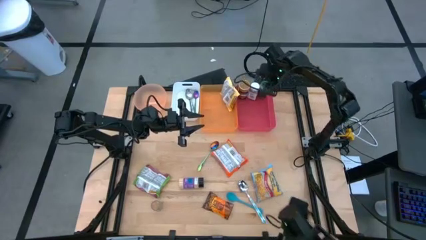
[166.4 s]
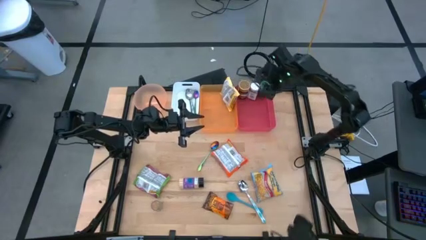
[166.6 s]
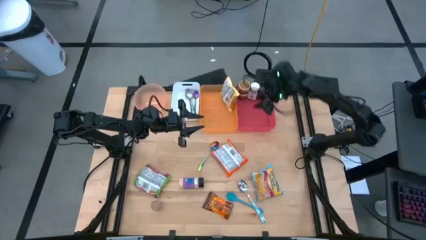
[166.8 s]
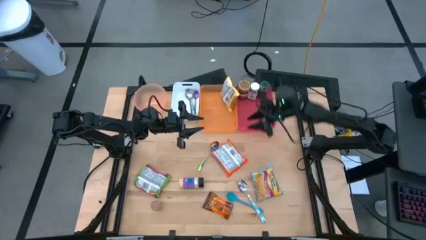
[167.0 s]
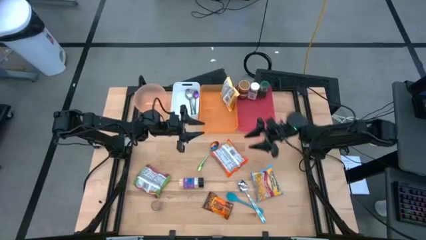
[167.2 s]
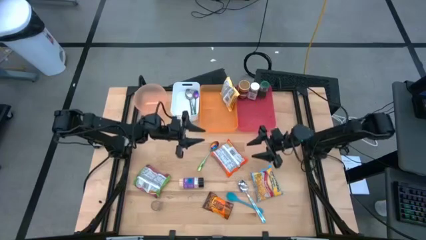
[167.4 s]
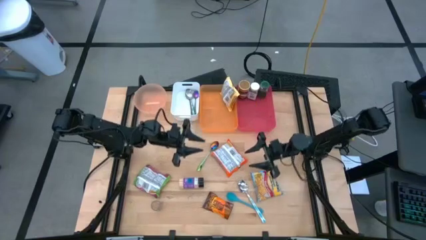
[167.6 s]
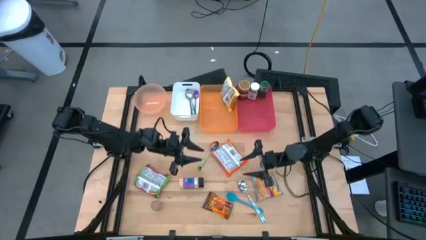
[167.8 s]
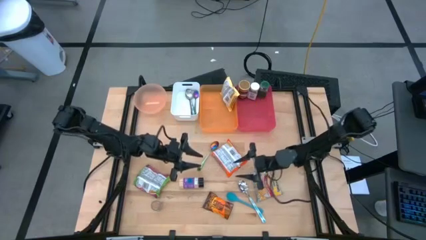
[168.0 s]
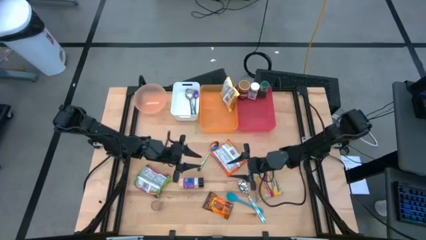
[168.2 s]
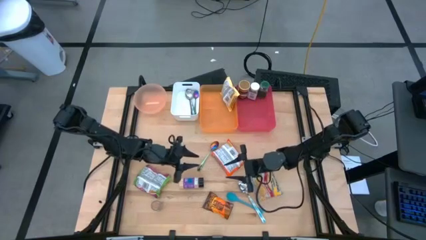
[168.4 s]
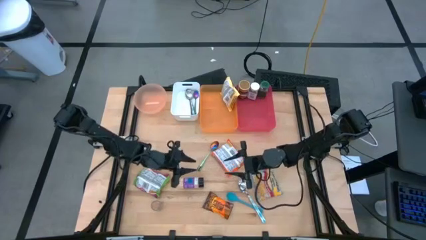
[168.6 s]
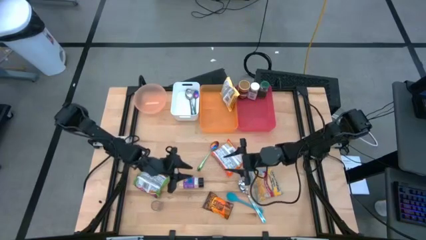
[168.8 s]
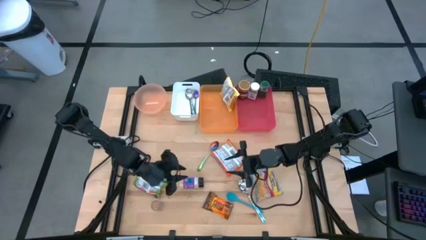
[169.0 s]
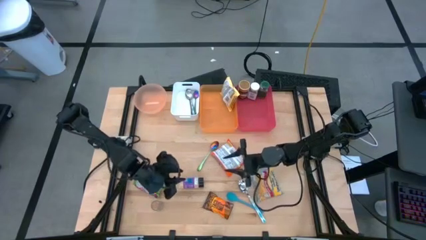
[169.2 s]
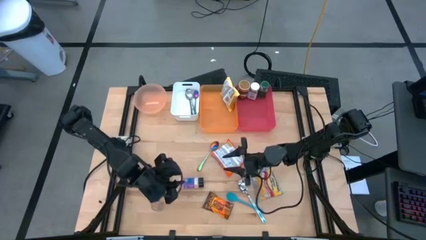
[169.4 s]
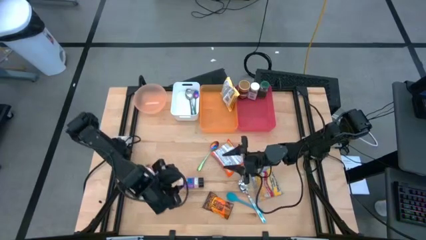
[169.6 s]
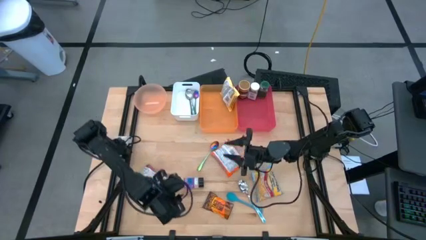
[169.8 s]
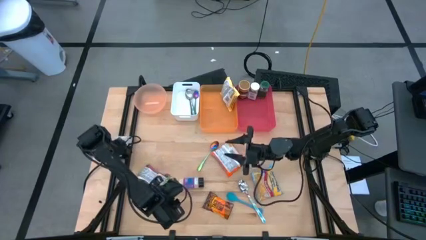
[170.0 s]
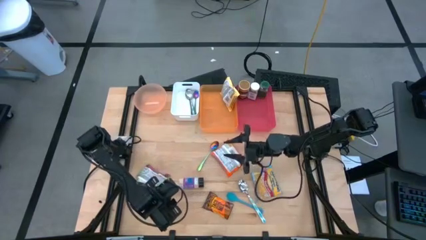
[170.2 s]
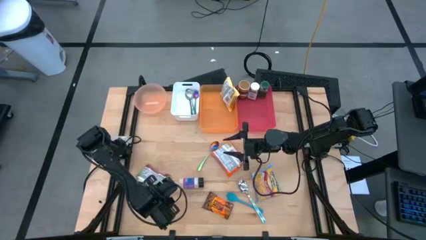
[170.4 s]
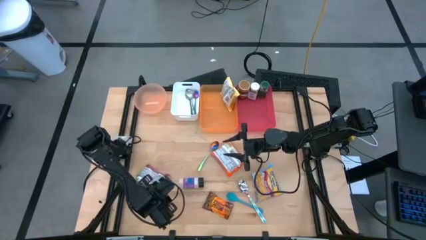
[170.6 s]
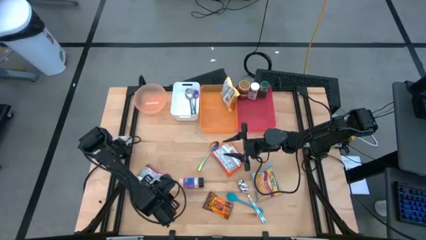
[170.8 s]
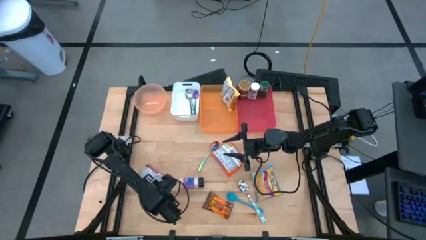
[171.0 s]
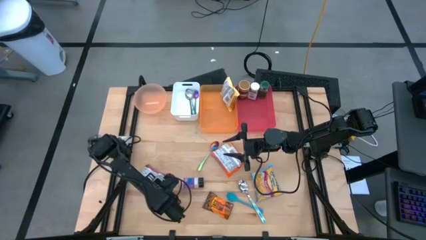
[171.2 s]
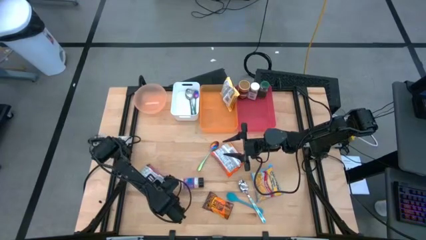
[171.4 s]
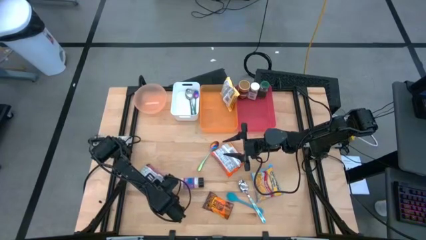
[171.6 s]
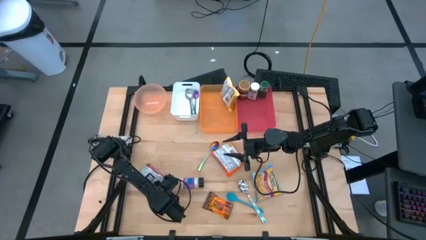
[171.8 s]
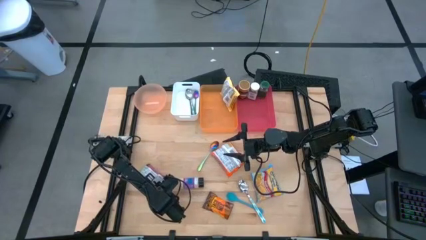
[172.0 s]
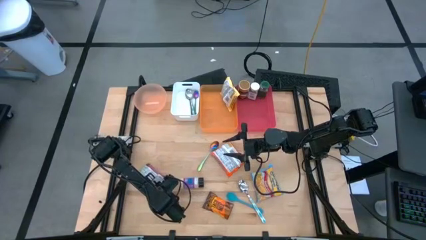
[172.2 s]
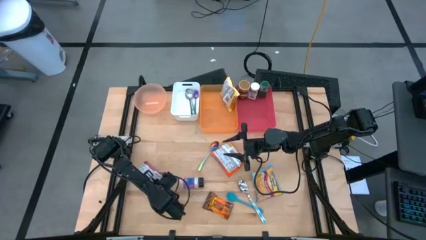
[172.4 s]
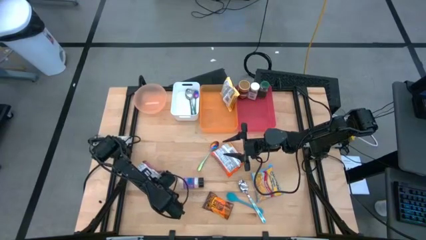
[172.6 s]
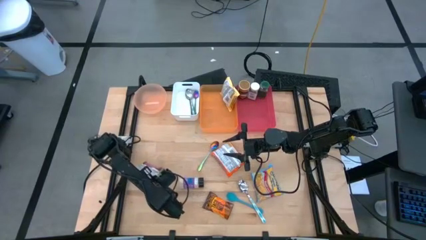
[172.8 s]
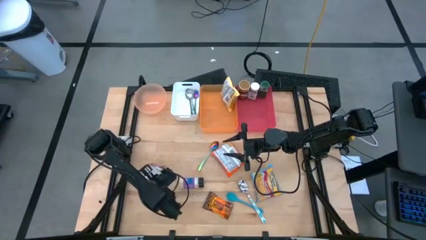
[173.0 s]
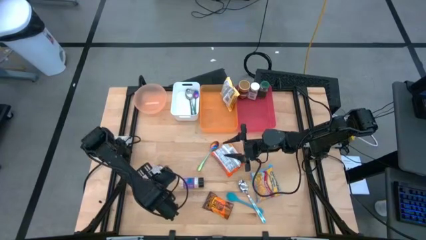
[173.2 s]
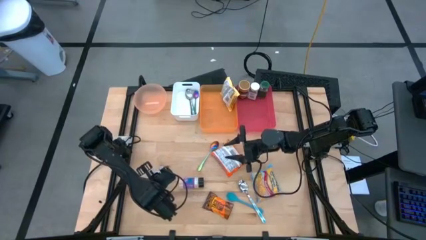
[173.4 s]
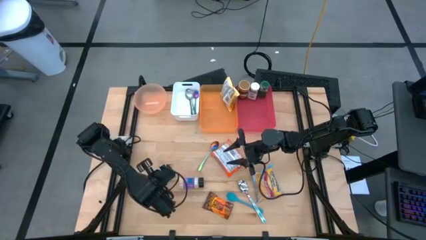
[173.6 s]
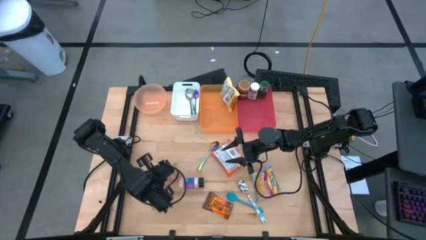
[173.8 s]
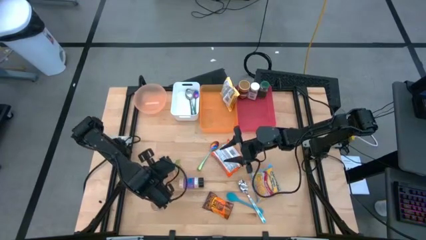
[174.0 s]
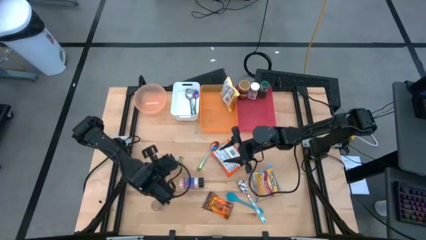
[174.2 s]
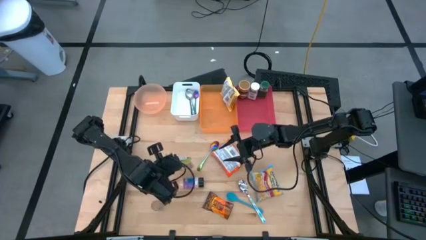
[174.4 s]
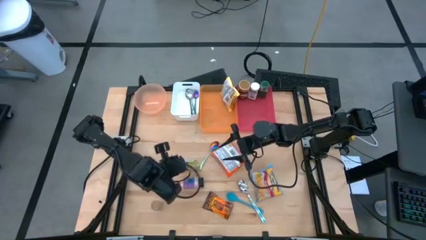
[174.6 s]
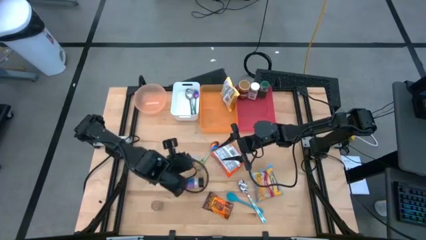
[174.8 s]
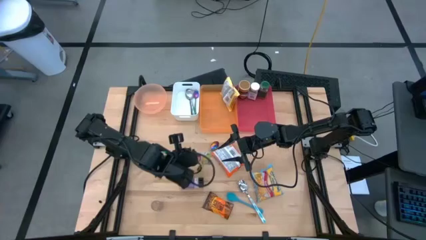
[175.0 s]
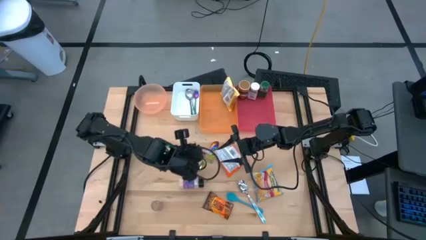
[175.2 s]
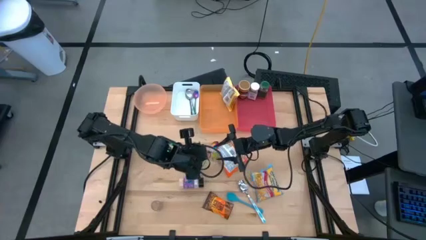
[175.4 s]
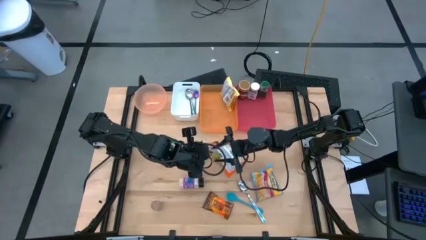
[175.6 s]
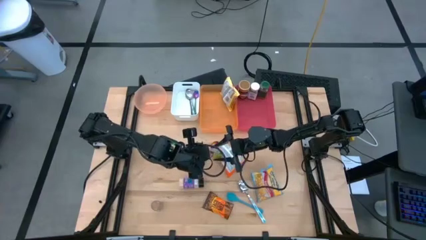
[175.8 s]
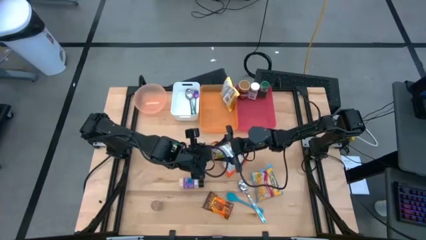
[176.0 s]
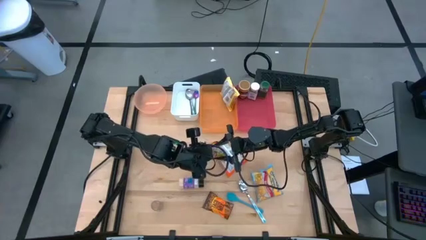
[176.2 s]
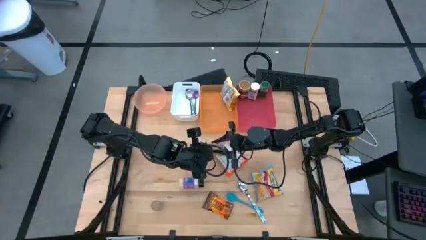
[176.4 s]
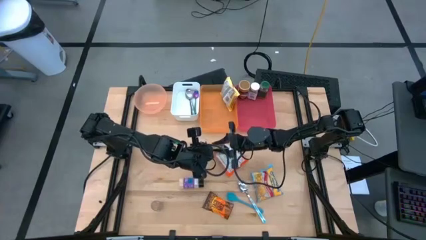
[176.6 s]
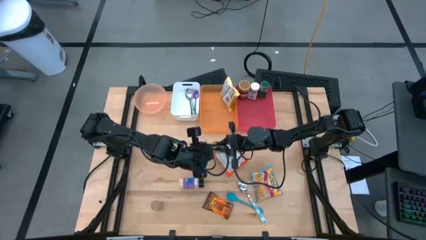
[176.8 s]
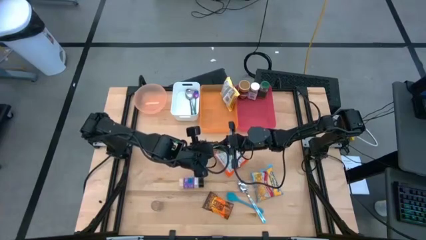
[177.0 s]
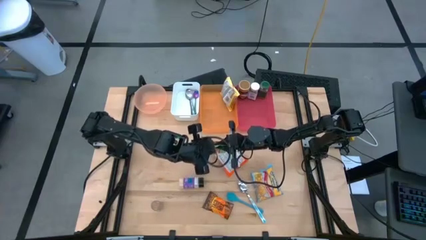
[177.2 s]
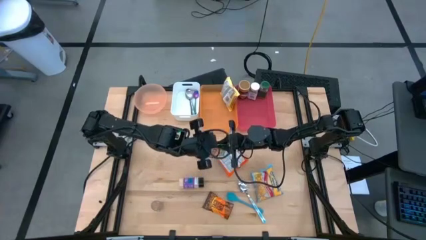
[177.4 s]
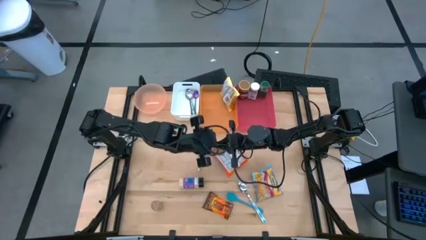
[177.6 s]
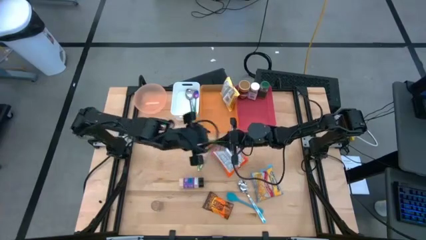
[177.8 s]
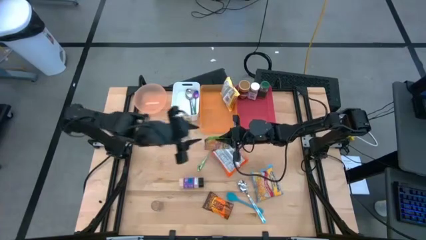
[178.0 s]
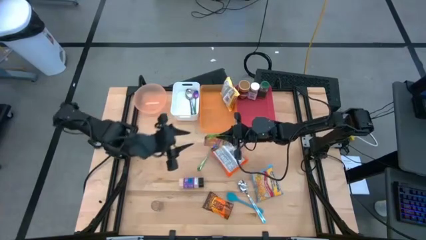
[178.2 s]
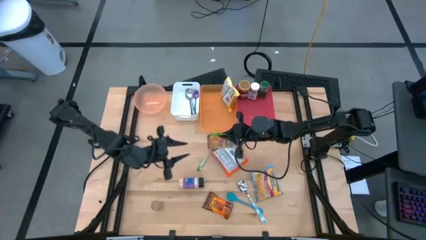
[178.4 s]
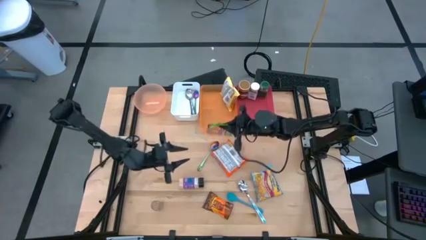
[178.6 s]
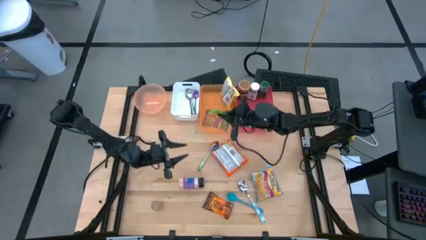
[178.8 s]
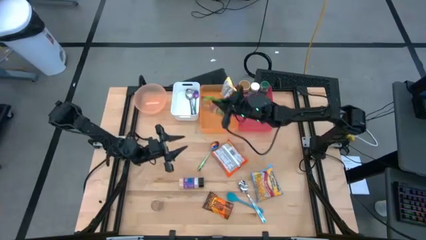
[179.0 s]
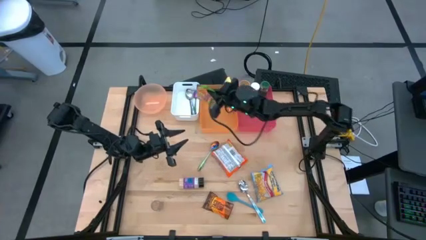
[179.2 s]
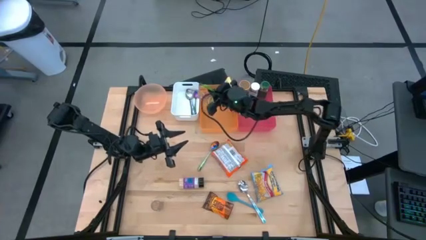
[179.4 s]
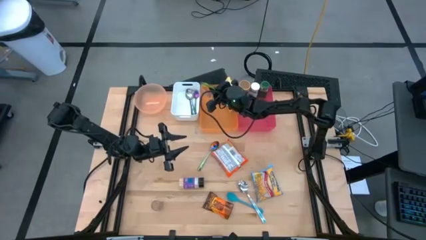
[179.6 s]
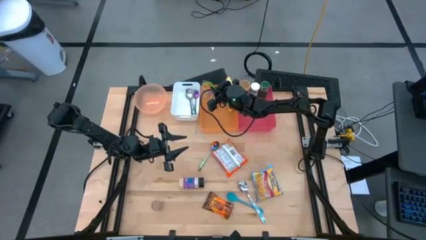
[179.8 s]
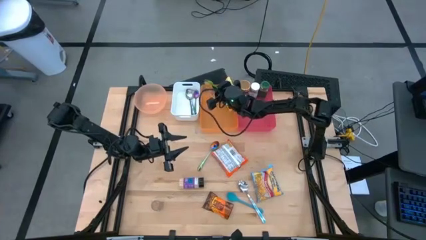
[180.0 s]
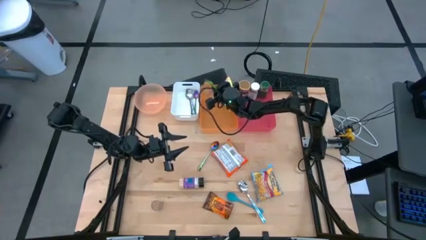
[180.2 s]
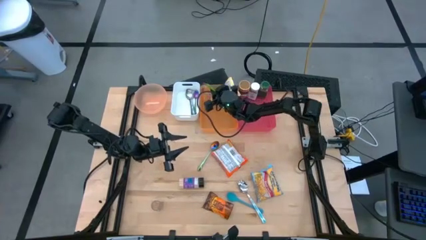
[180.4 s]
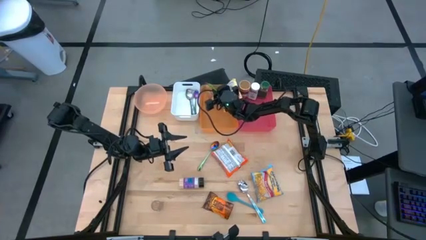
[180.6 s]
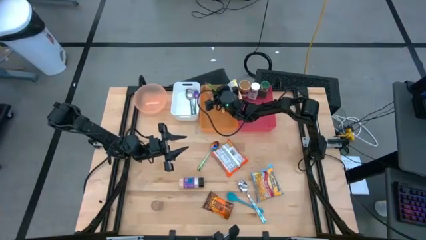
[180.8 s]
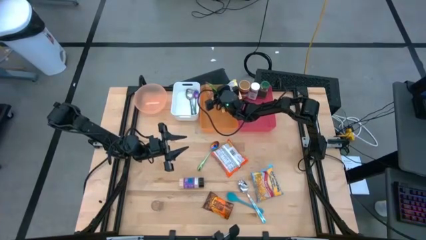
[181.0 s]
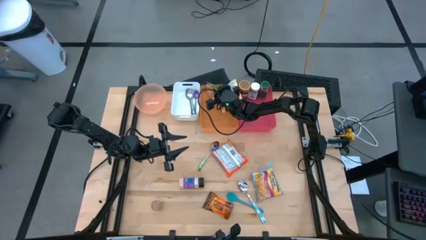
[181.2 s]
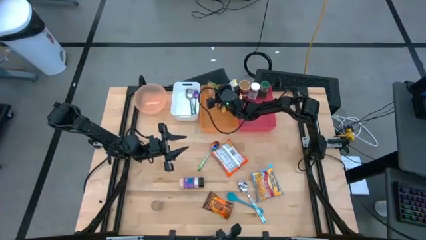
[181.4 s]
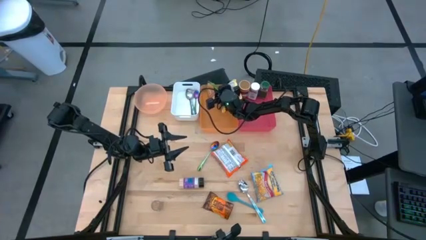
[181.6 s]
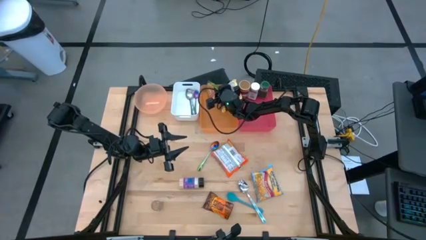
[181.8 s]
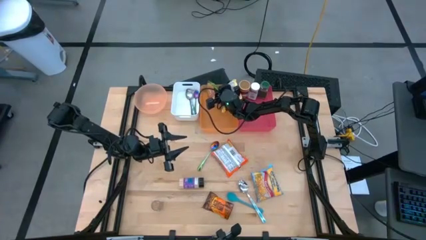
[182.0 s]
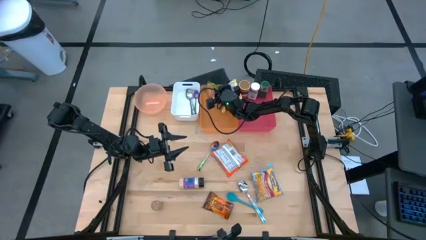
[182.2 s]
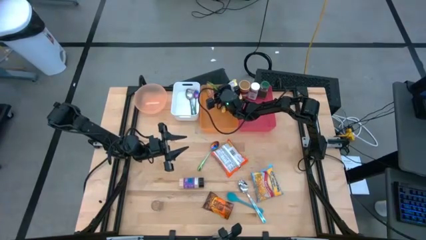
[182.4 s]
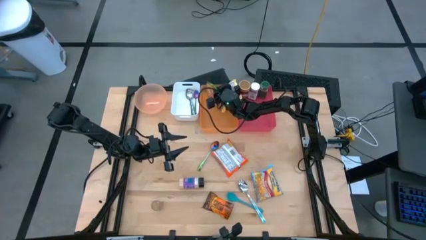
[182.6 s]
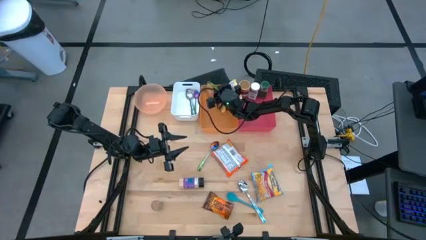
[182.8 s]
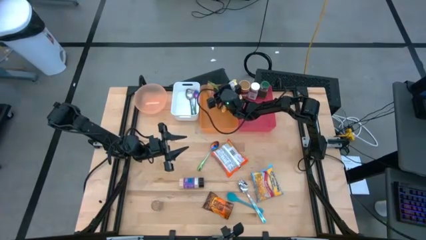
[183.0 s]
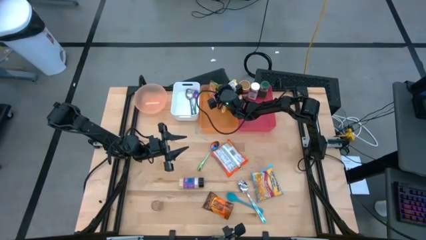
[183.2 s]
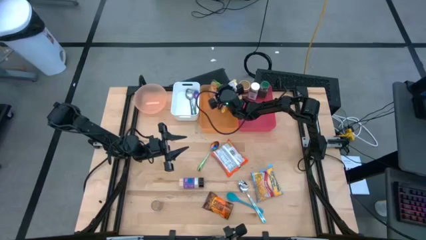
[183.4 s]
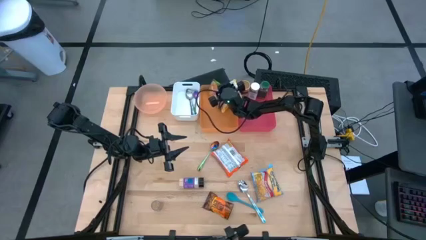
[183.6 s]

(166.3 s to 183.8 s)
Task: Pick & Place Food Item
Put the green noodle pack into the orange bin

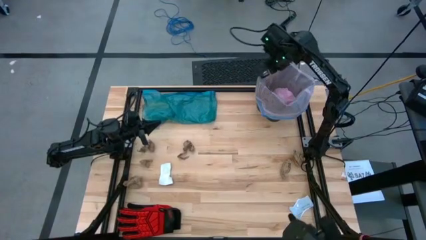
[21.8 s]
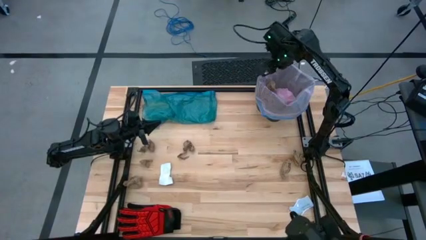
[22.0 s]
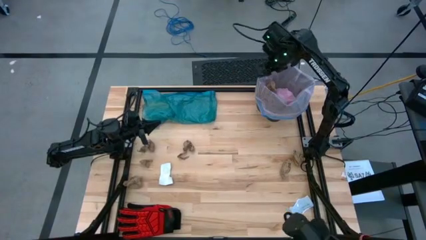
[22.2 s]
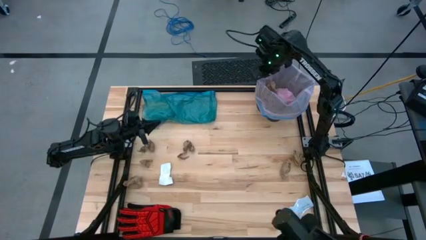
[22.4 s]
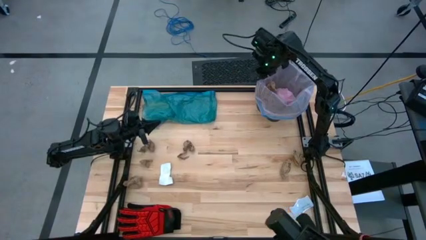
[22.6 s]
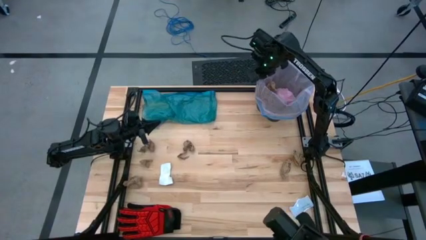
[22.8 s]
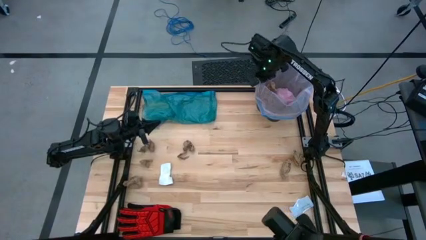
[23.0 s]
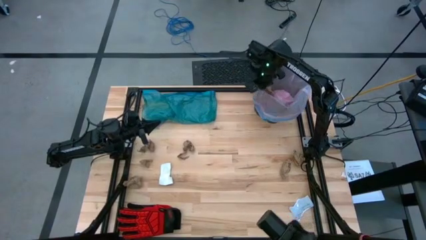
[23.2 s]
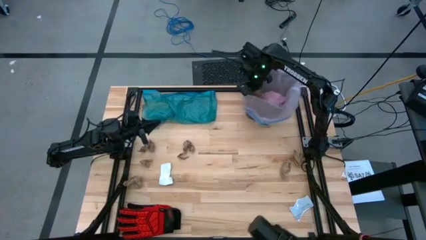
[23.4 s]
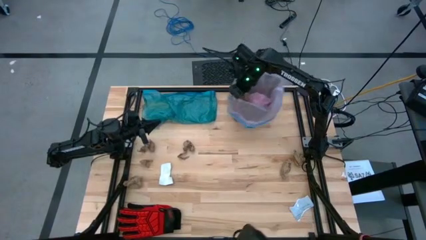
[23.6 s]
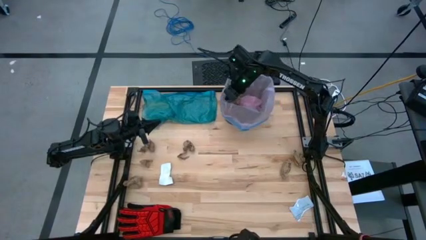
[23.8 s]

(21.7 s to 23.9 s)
Task: place trash/remove bag and relplace
Move the black trash bin to the top center of the table
